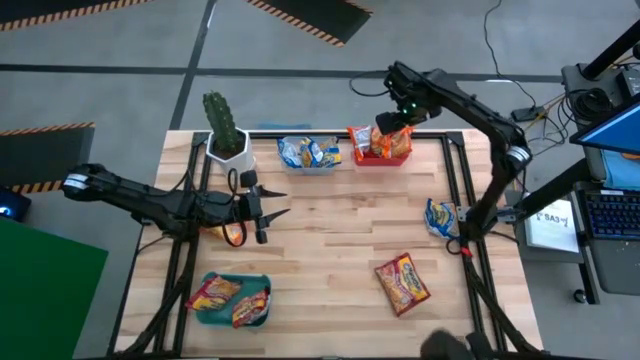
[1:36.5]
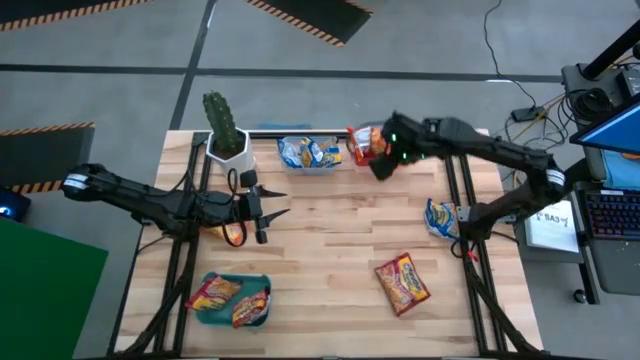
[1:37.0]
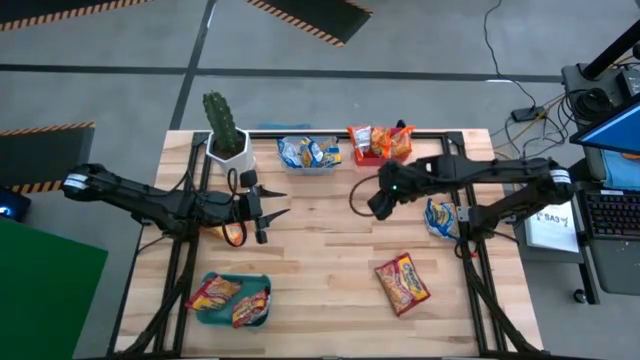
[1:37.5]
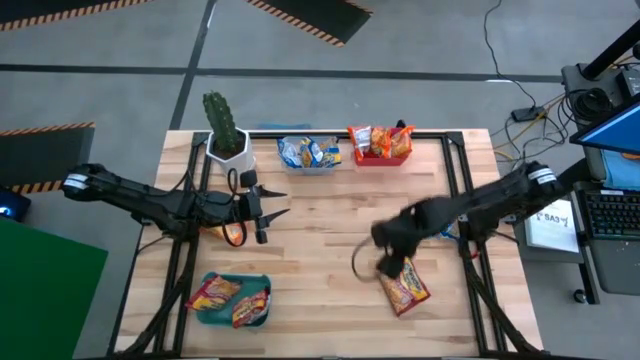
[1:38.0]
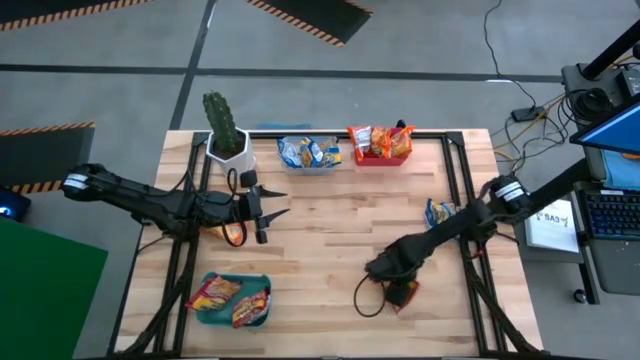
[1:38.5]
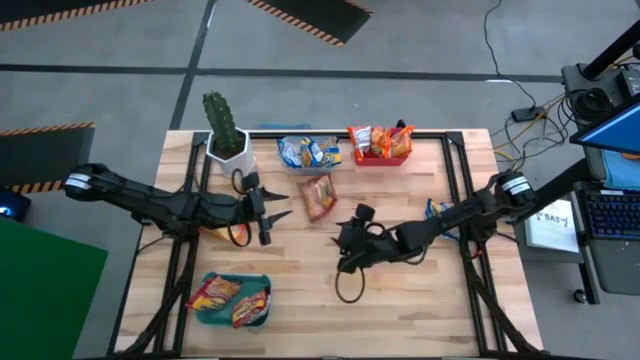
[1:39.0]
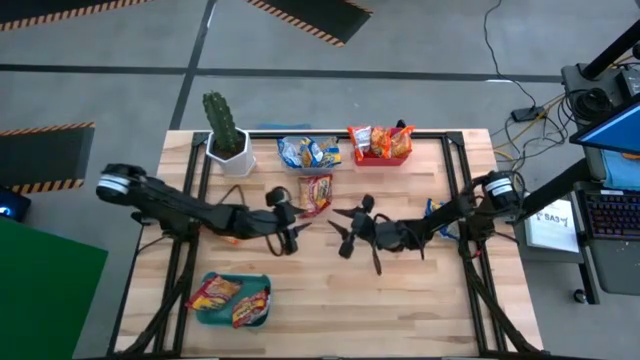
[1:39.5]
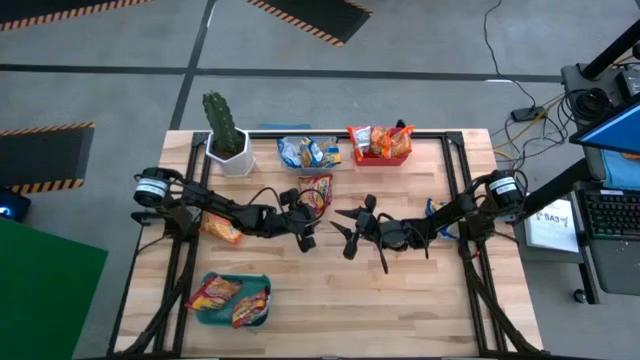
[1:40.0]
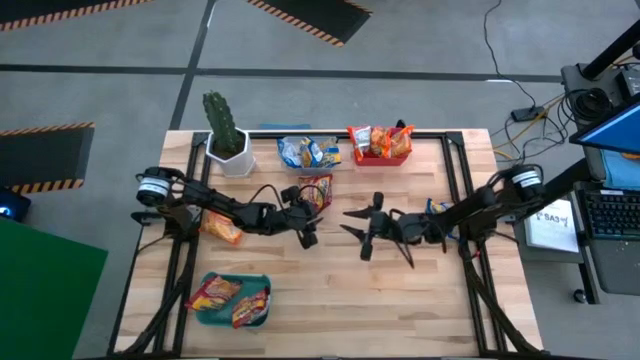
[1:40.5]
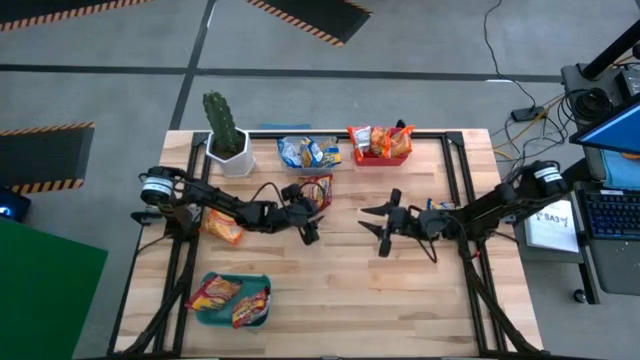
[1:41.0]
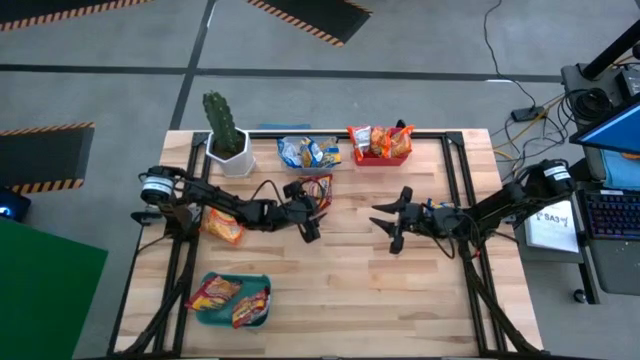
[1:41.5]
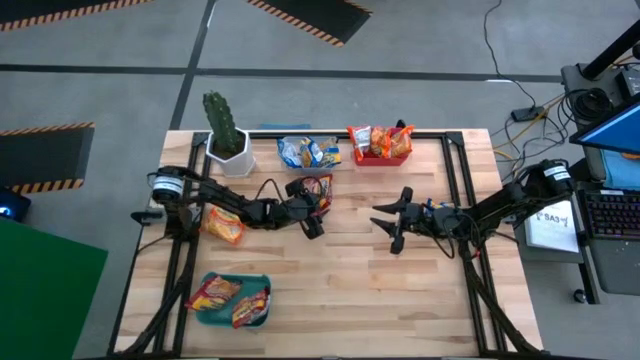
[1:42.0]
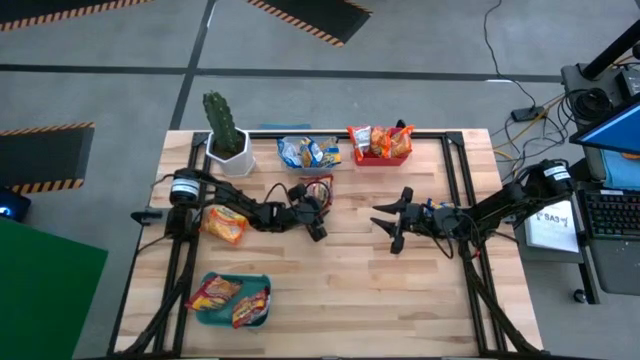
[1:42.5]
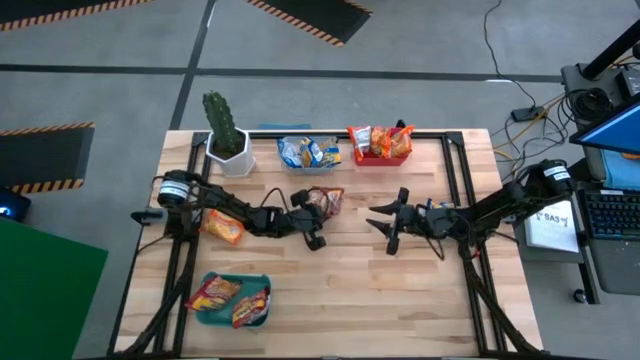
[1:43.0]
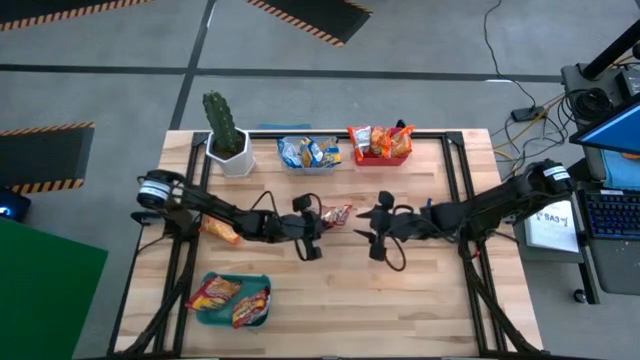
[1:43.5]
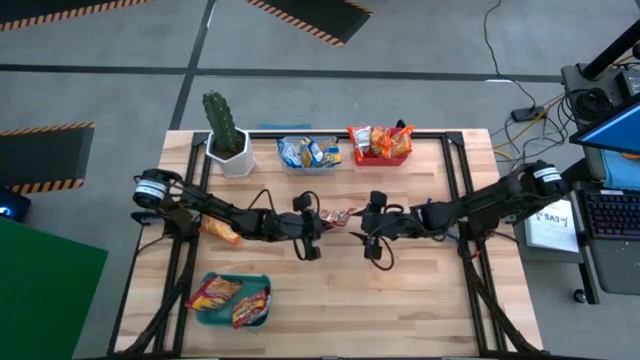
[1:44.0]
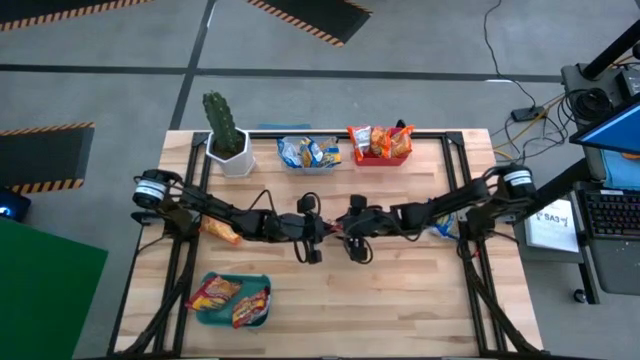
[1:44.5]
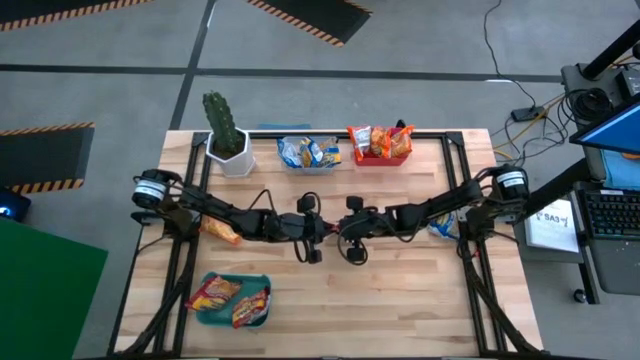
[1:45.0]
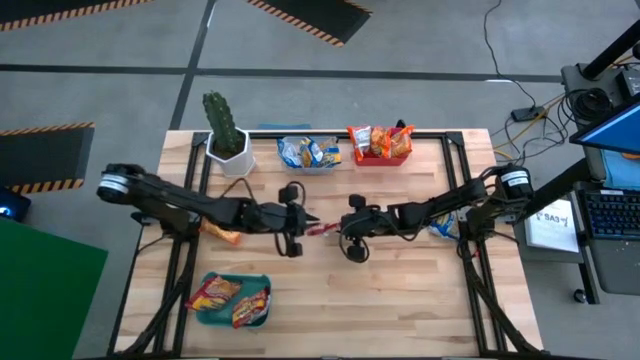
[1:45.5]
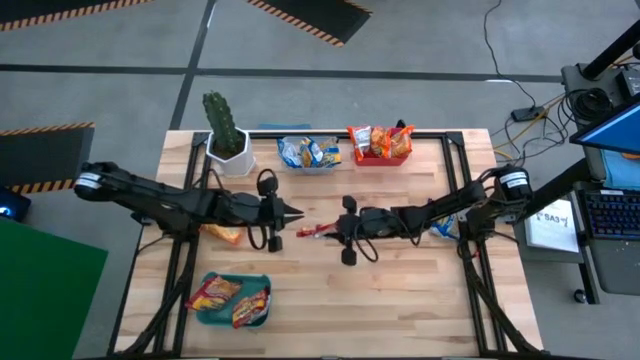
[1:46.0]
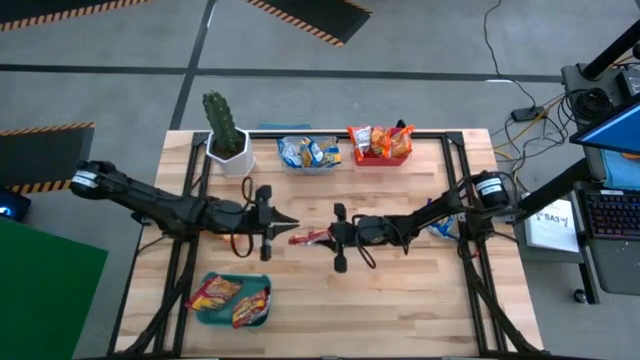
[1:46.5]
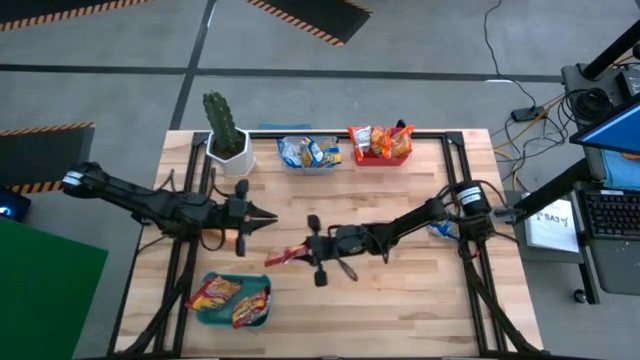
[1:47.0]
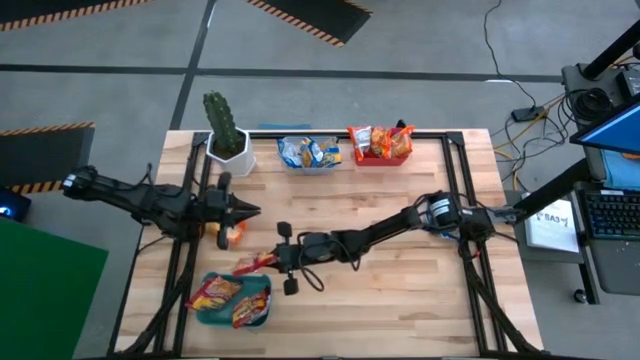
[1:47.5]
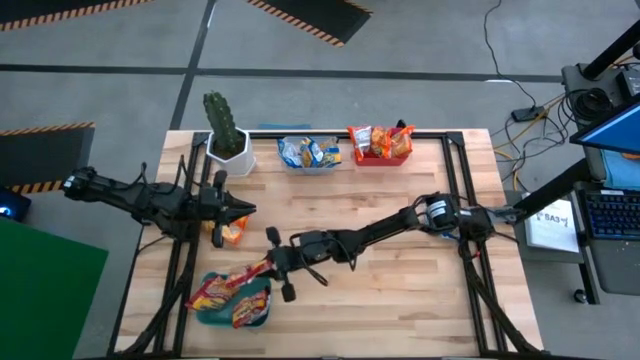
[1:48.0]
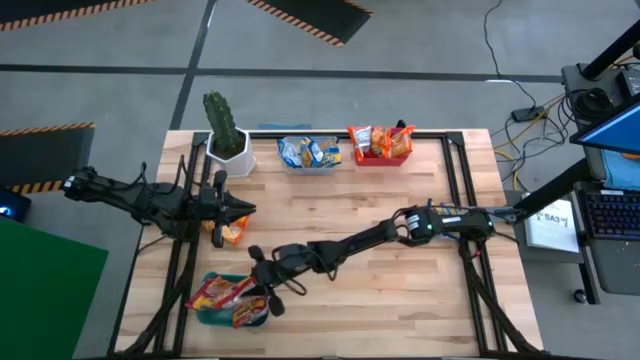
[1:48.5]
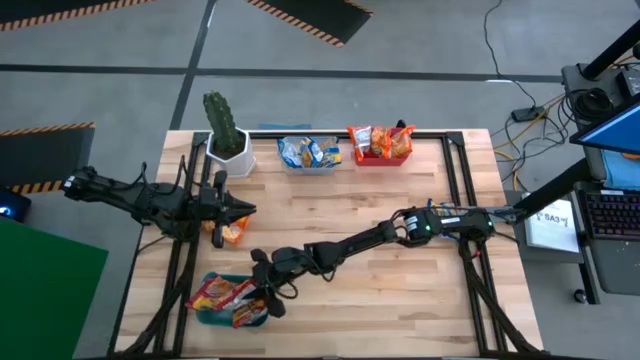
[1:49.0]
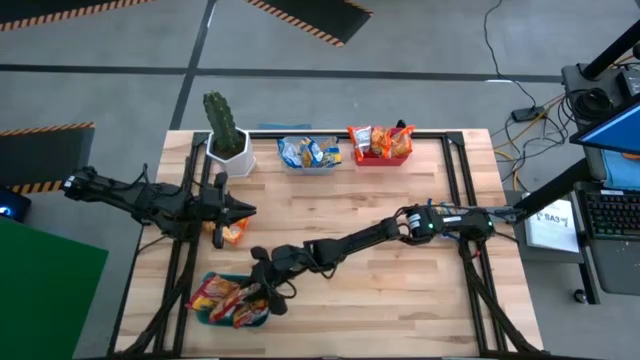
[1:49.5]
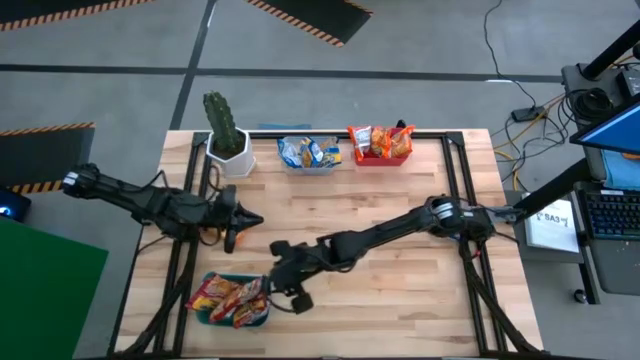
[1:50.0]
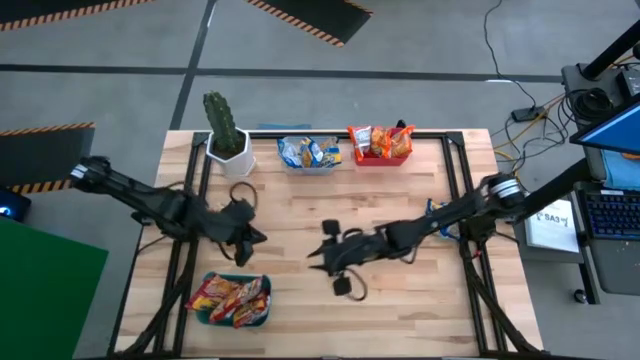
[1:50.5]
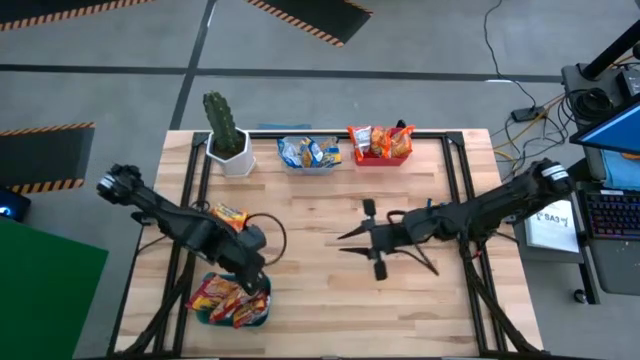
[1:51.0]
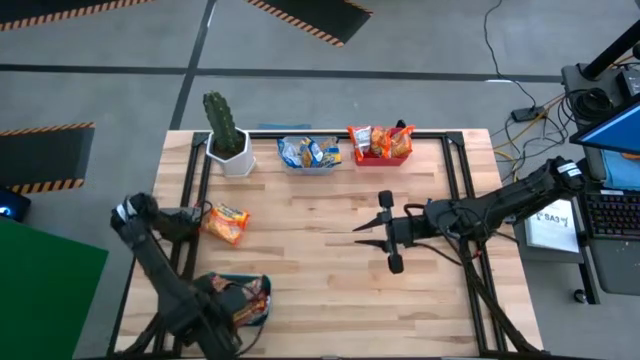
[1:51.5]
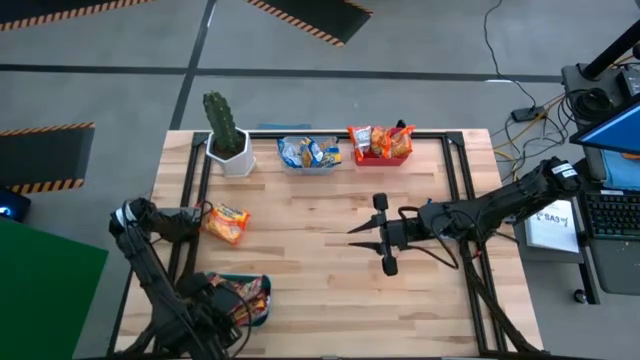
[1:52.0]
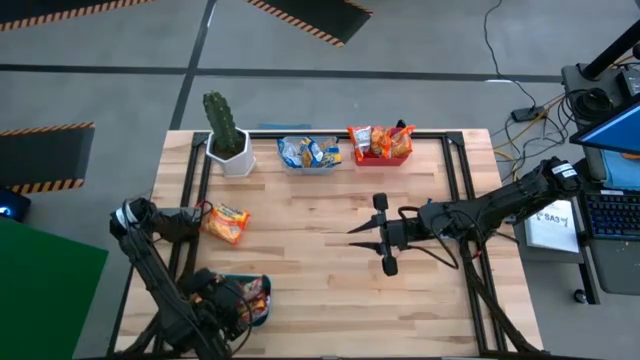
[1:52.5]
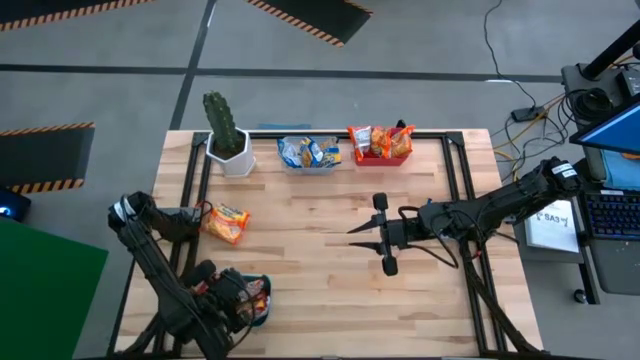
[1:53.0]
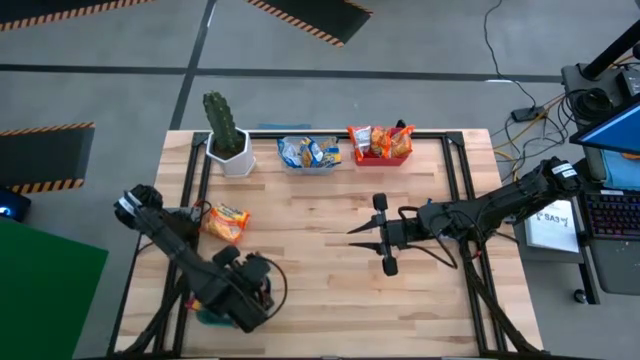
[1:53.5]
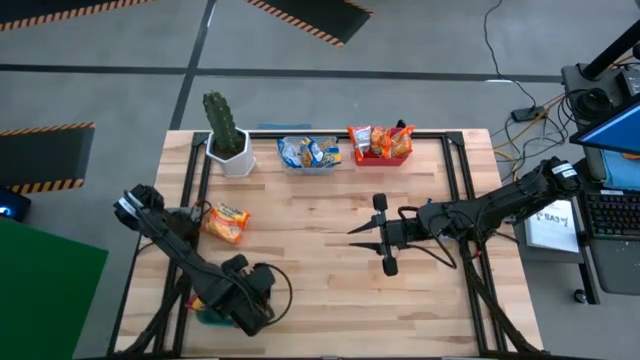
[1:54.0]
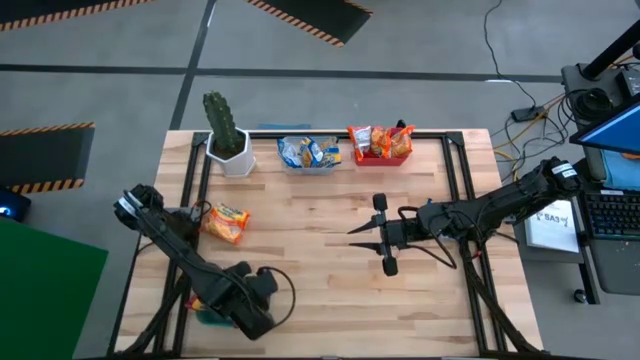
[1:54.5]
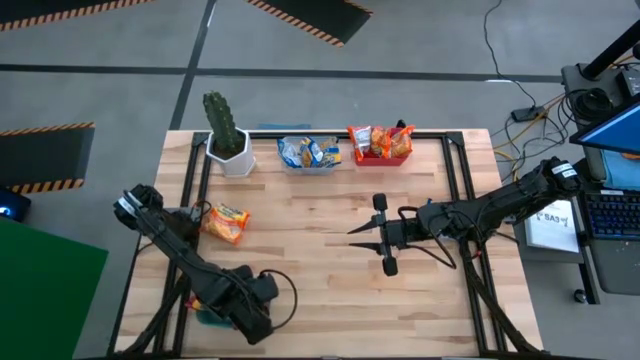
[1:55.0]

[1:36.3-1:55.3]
Task: Sort Maruchan noodles
Put the red noodle pack into the green bin

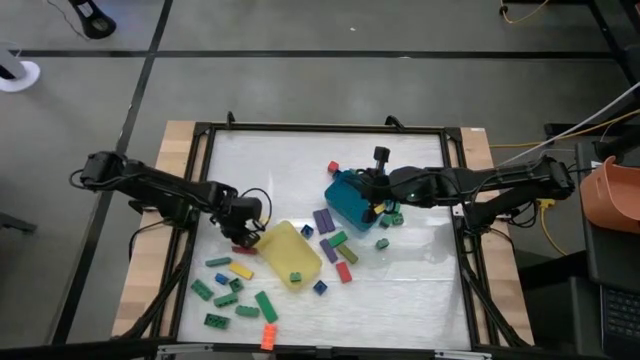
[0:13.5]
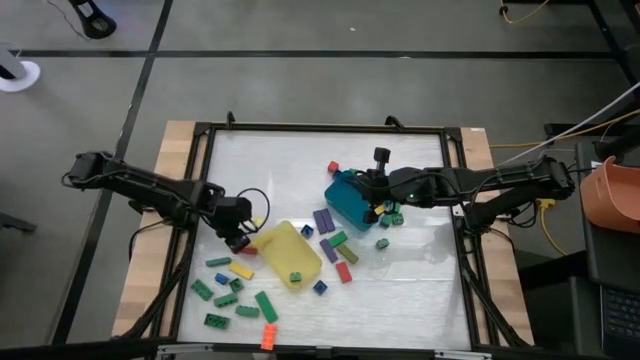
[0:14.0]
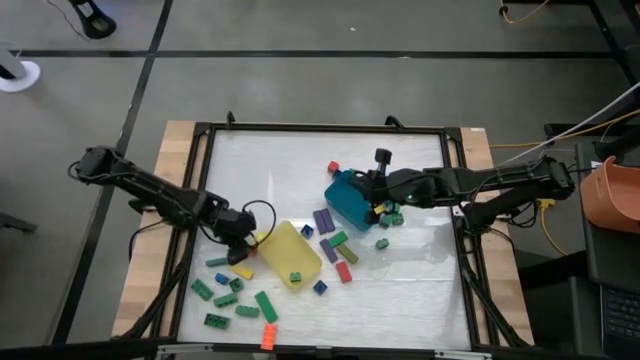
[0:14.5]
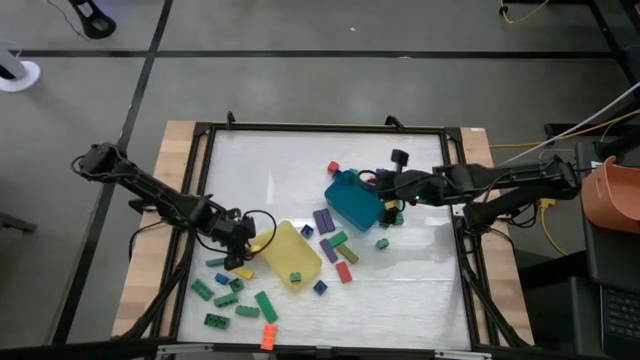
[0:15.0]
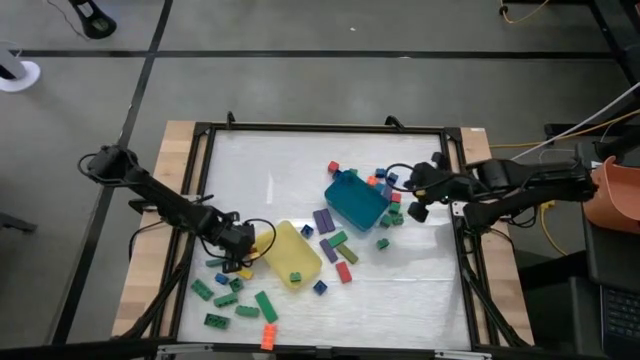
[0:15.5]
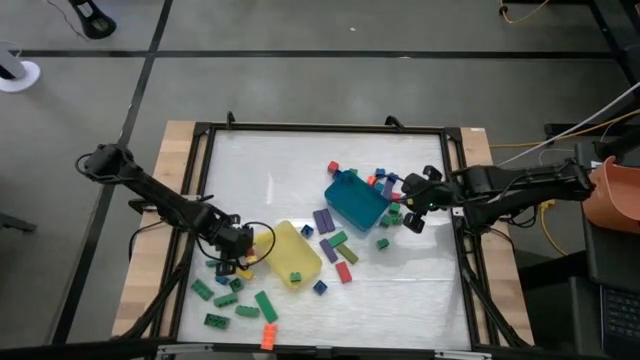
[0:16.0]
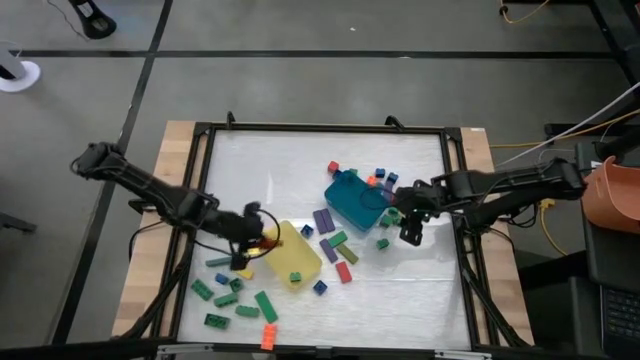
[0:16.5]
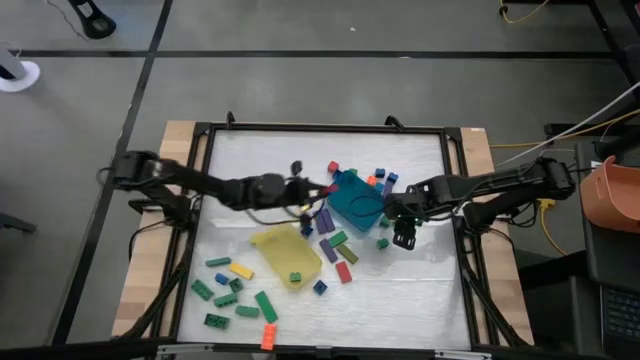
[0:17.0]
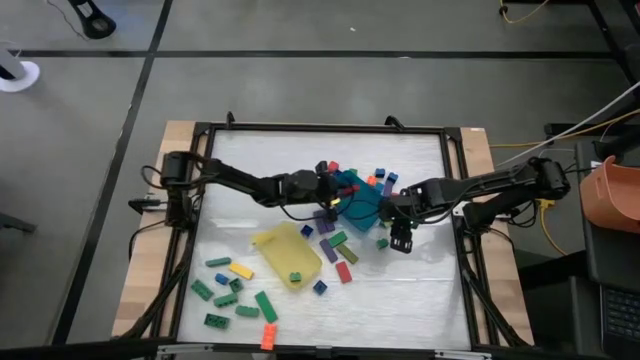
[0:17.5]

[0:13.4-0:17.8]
Task: Sort blocks by size
Put the large red wooden block into the blue bin
